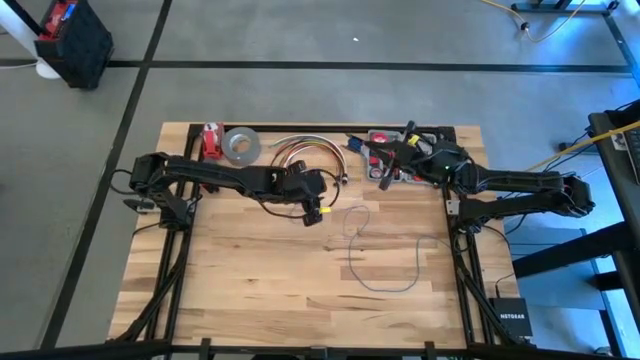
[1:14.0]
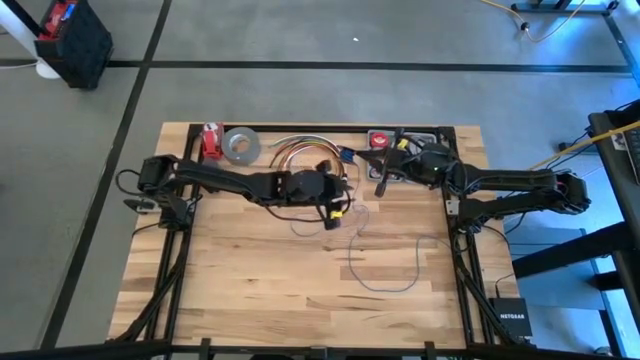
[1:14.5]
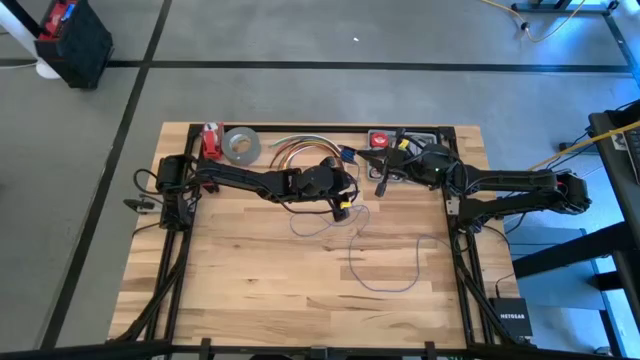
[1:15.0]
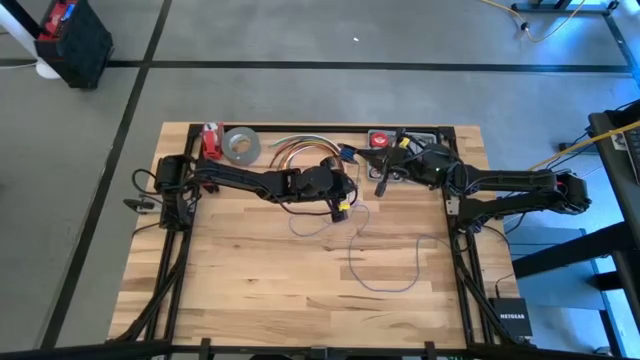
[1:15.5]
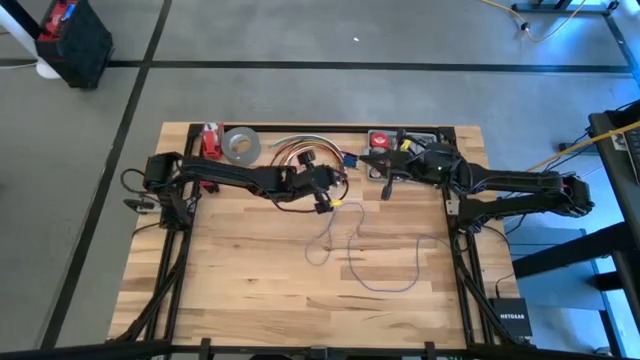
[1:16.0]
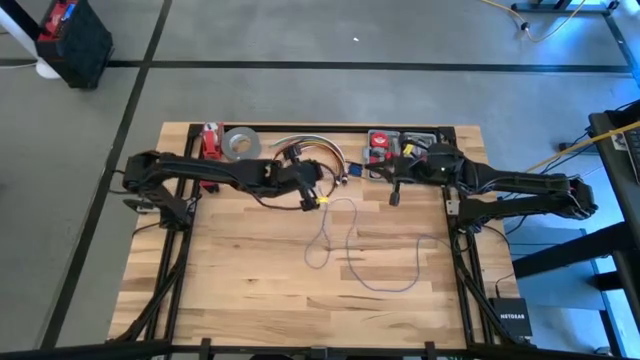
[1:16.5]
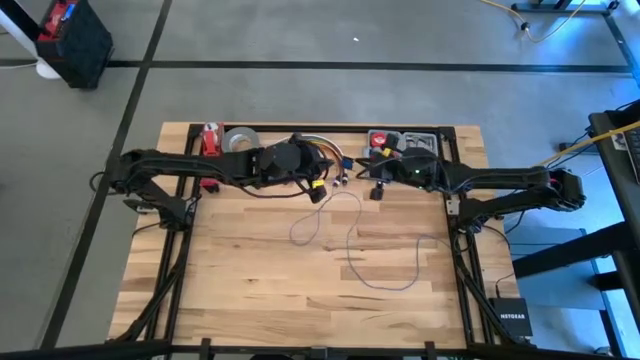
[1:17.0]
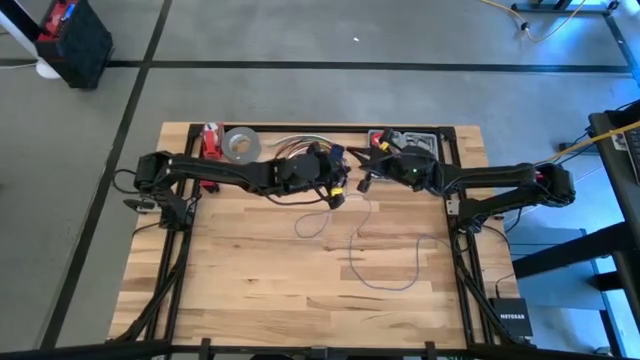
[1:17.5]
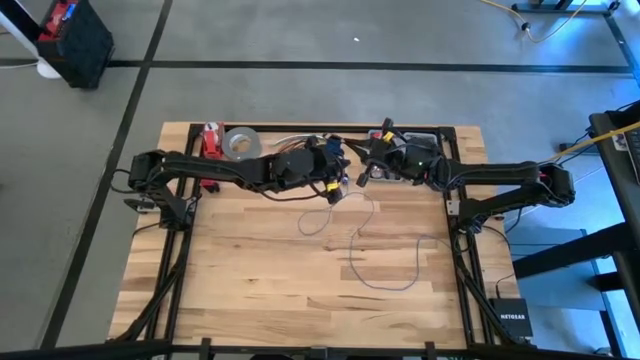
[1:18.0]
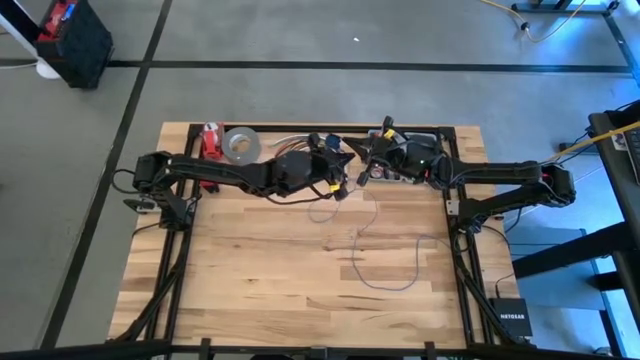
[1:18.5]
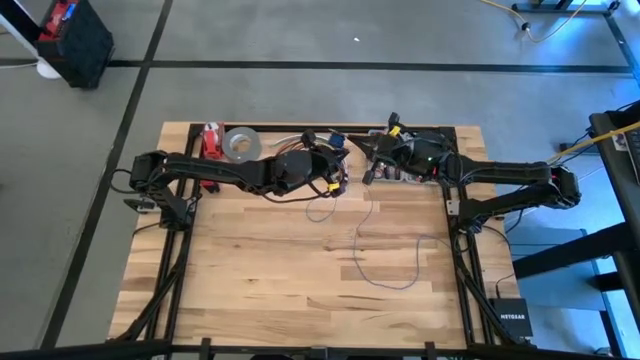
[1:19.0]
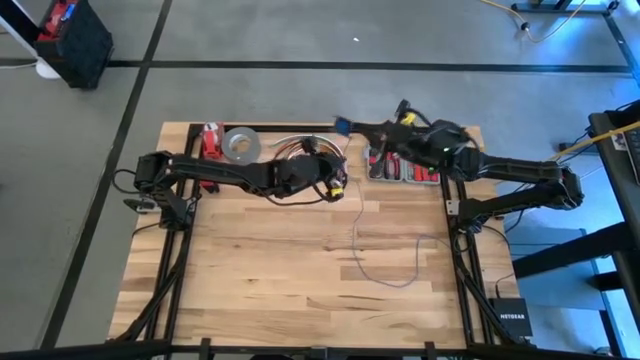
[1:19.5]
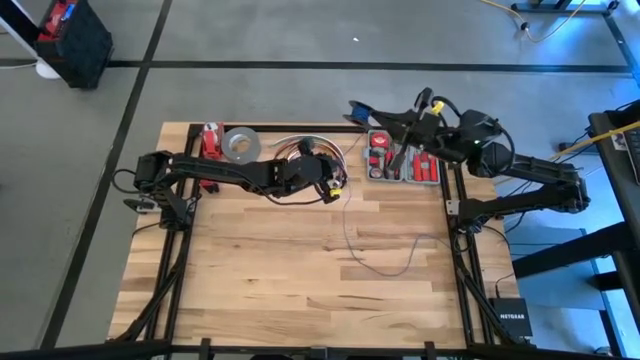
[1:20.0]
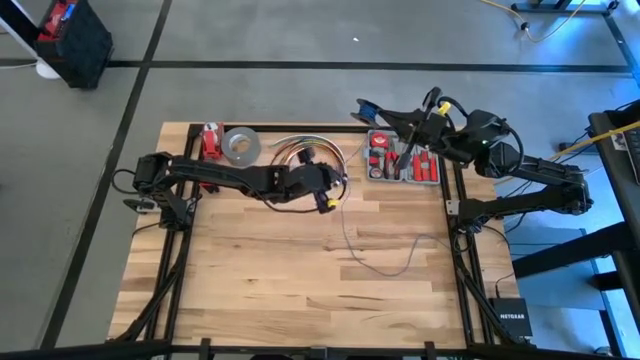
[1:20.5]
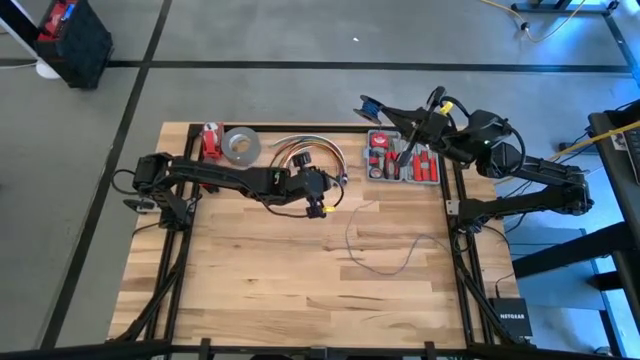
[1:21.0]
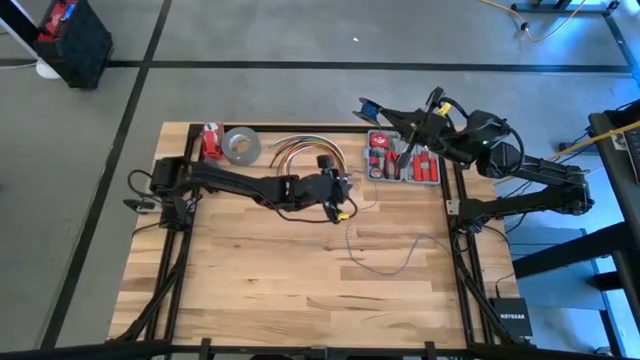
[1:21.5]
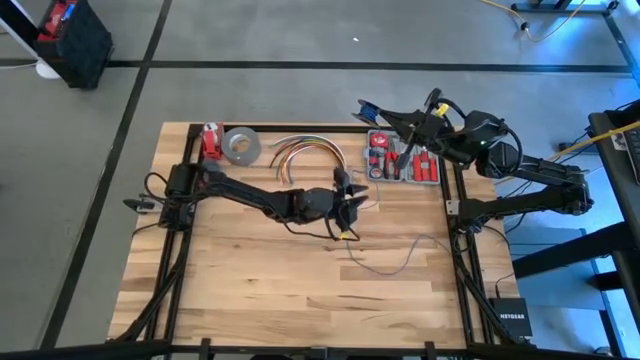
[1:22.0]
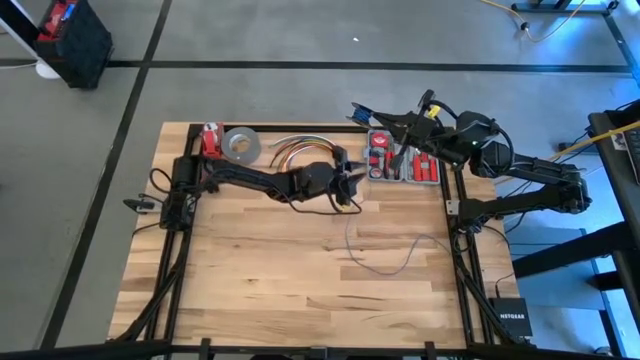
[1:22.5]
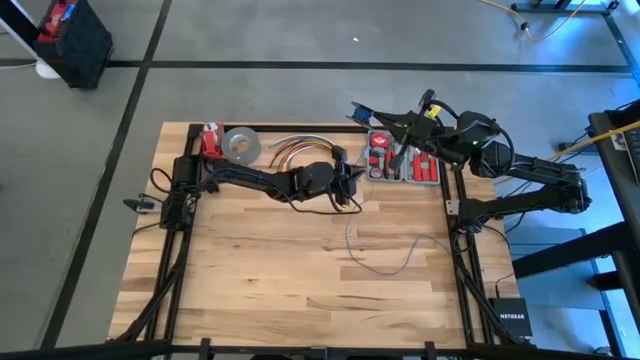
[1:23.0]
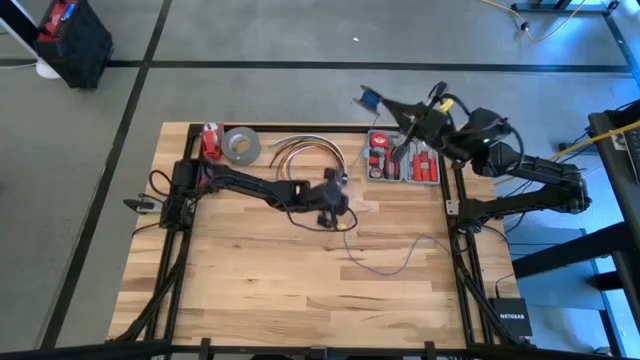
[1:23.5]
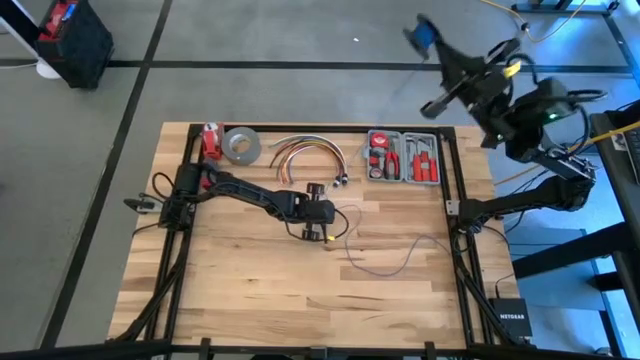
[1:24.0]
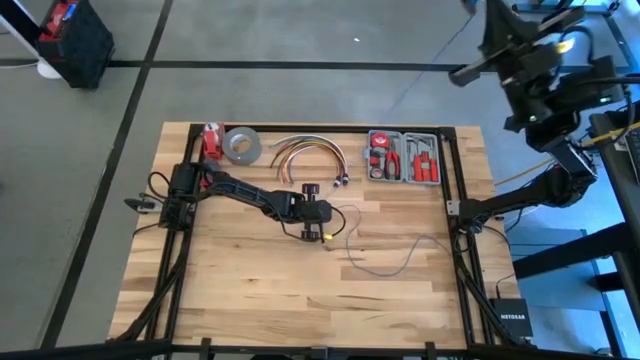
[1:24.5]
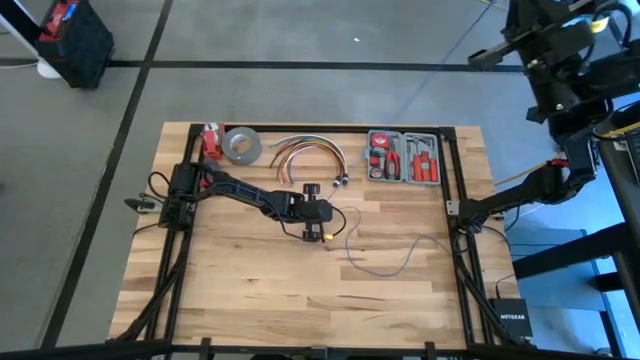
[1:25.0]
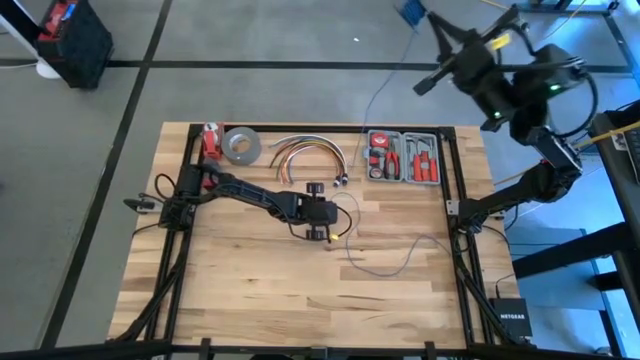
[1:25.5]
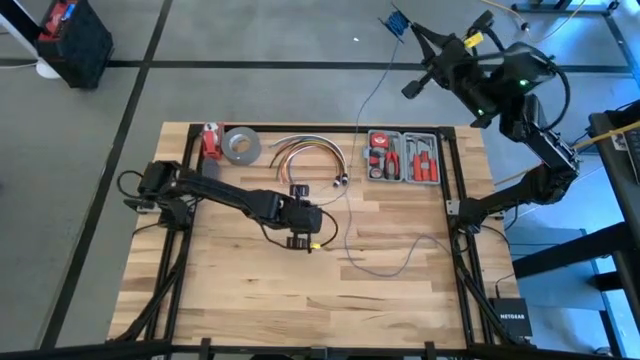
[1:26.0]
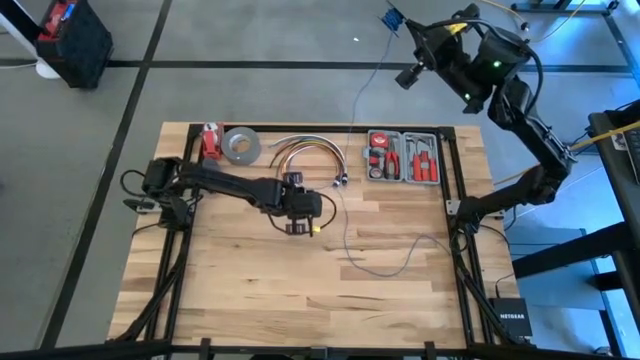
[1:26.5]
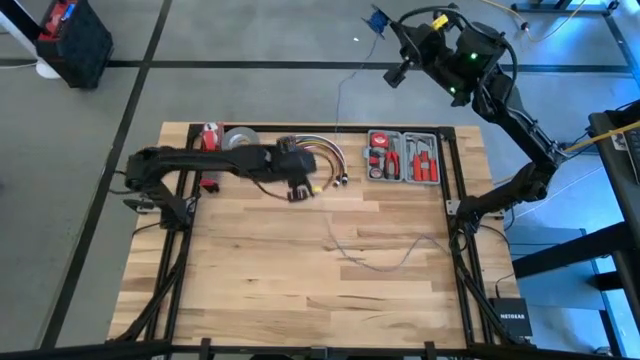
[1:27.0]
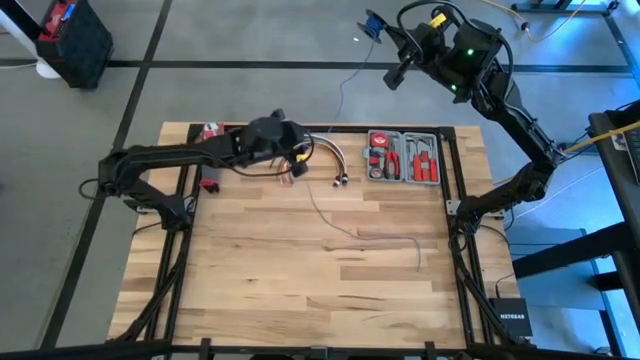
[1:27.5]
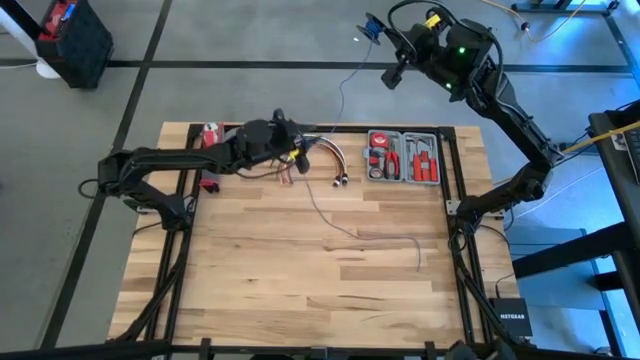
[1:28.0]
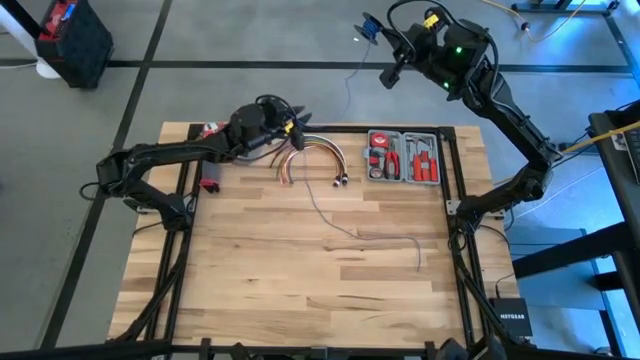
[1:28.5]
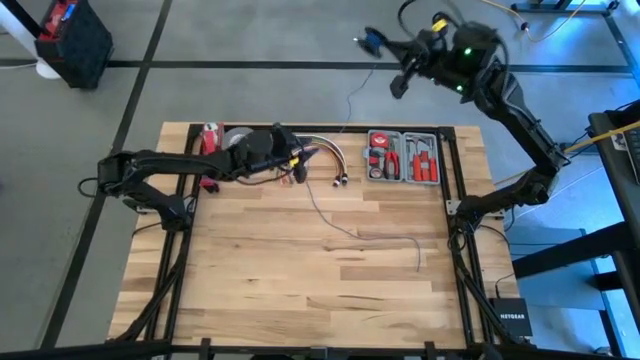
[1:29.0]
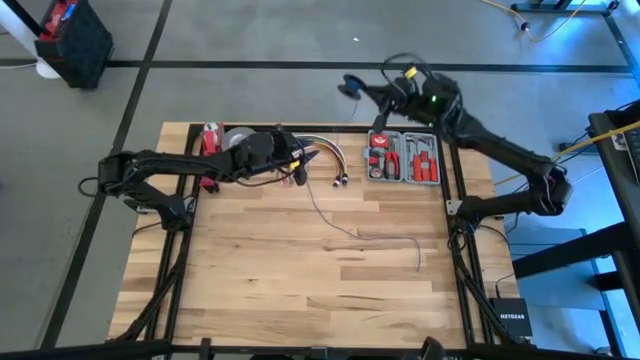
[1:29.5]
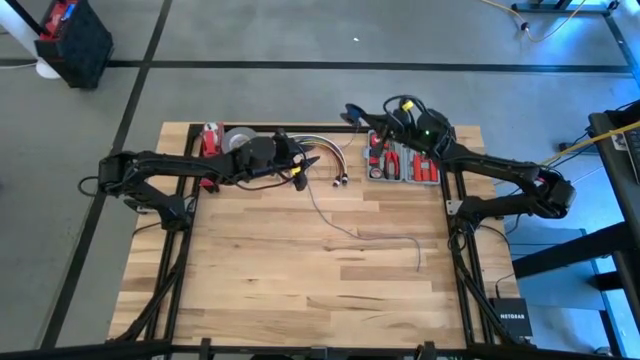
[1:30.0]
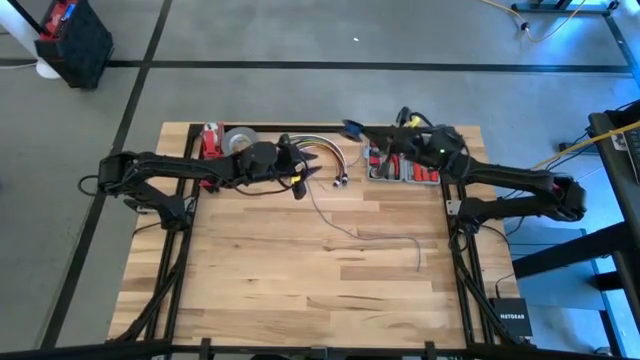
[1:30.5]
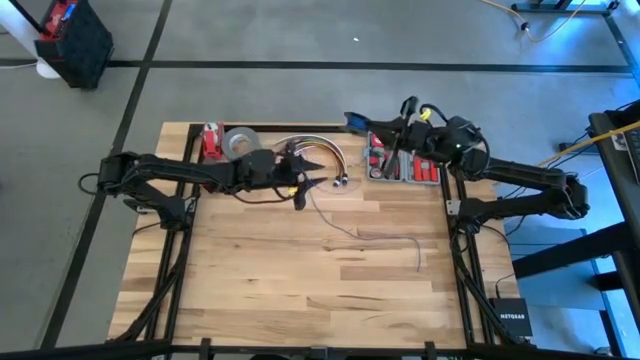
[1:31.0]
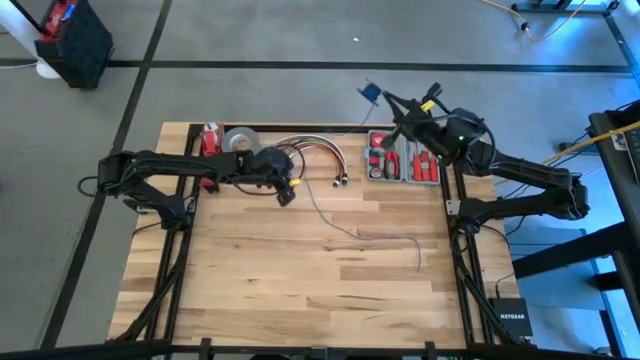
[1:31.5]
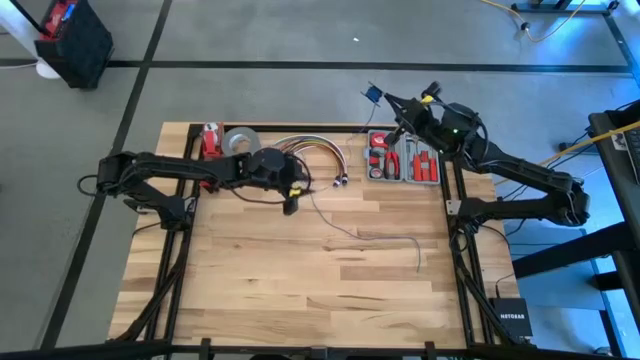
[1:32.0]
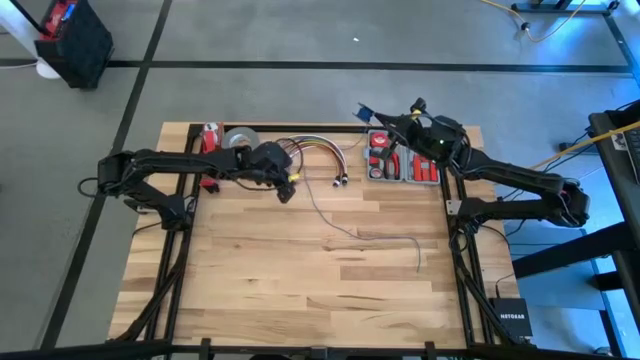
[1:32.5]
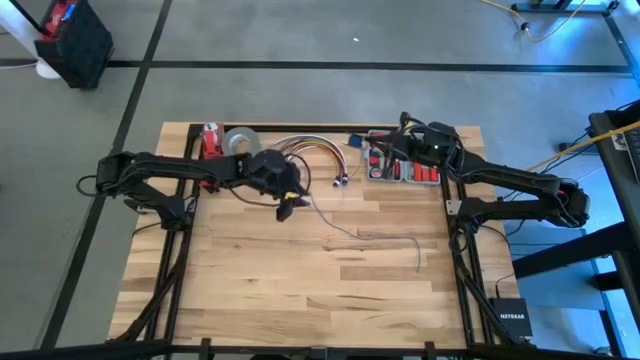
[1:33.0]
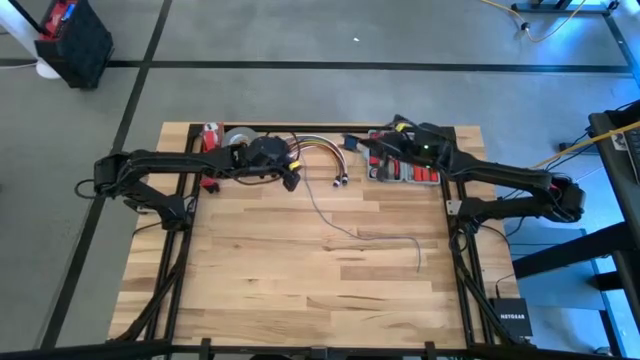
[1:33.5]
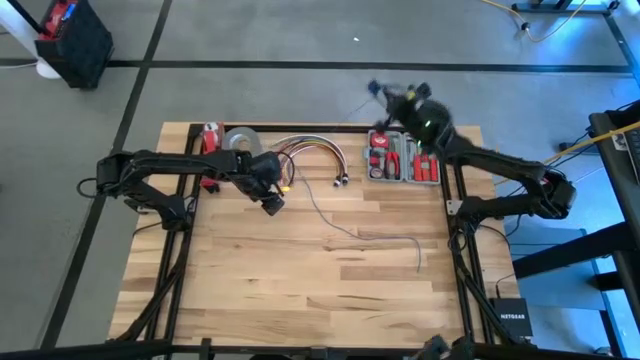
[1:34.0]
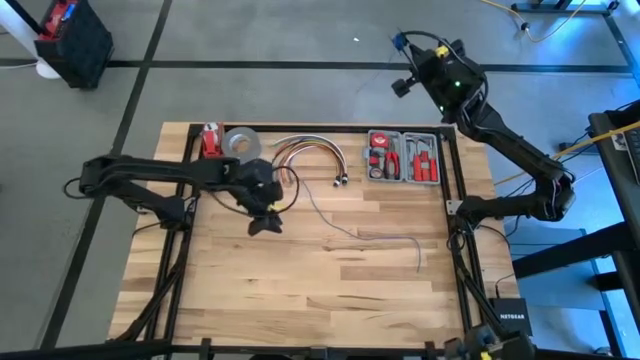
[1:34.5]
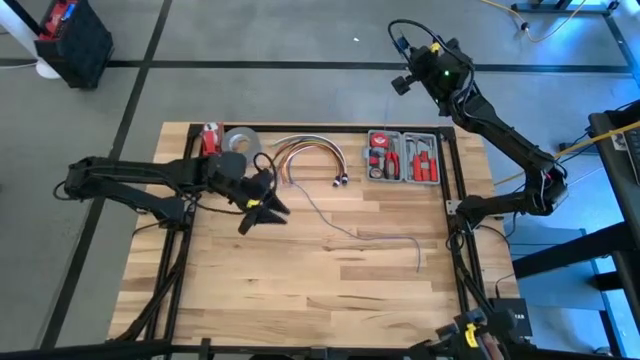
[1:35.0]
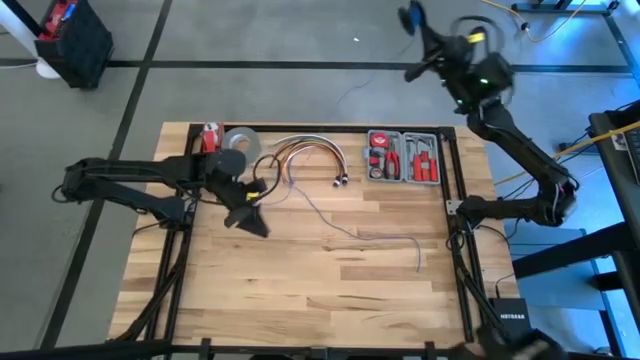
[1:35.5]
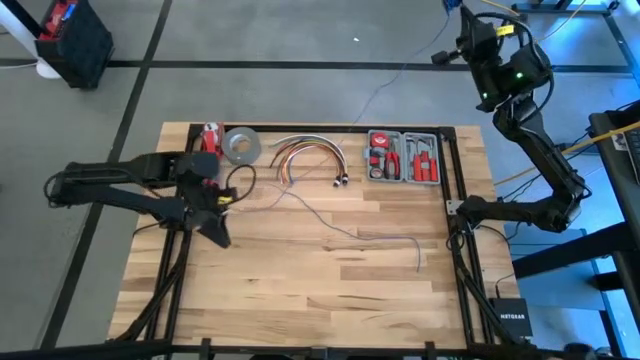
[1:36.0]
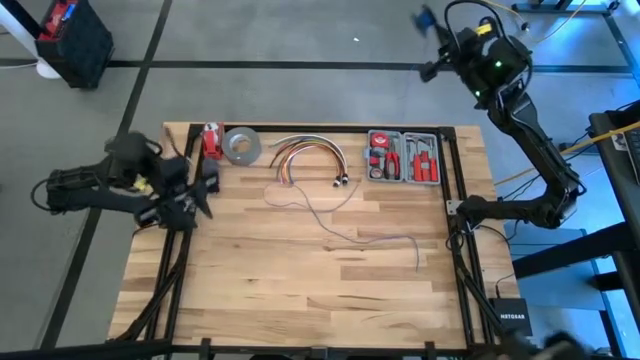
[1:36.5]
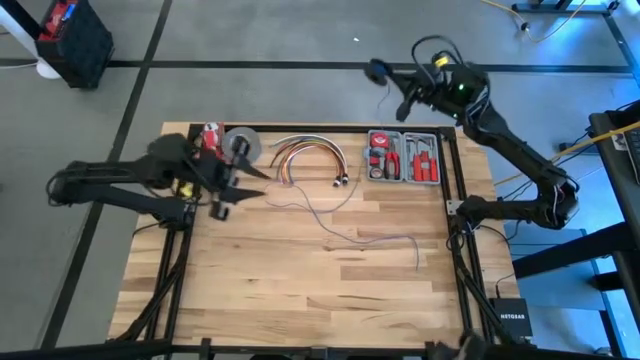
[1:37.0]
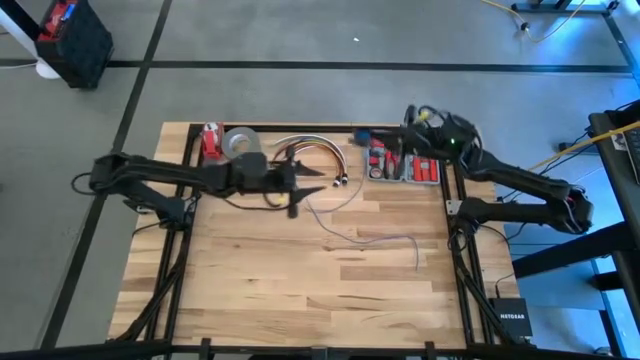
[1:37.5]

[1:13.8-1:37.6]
Task: Coil cords
Coil the blue wire on the black spool
